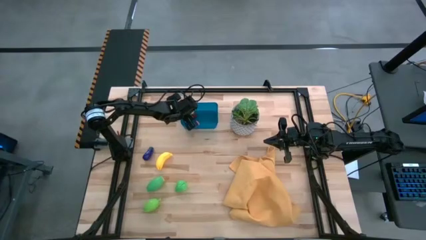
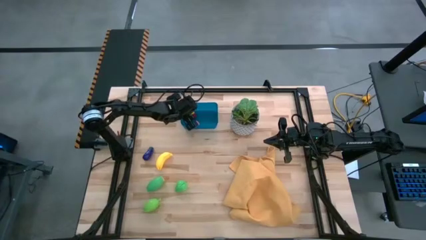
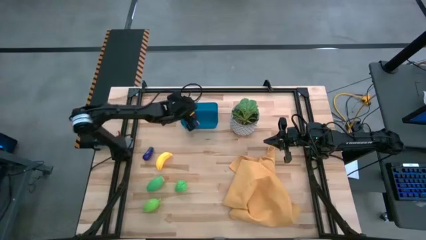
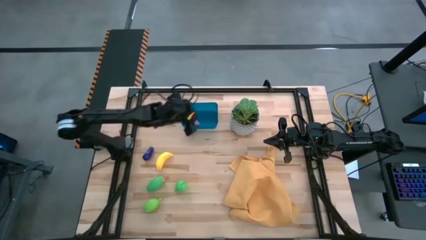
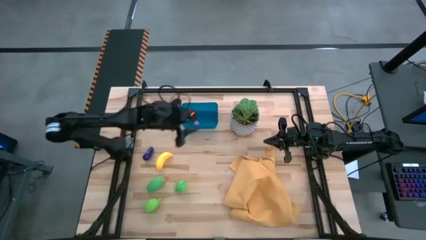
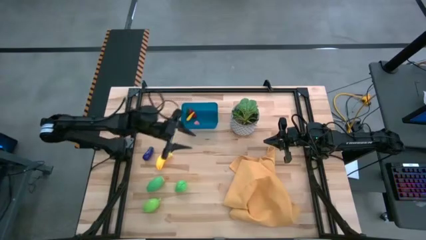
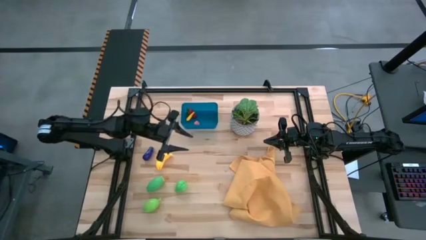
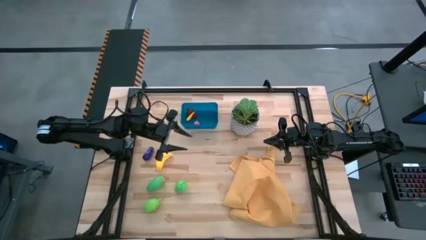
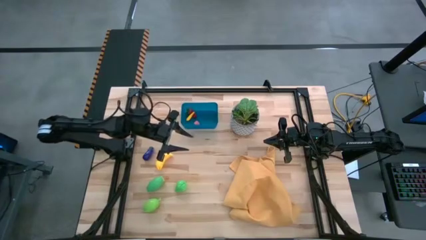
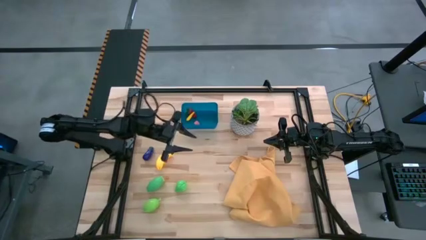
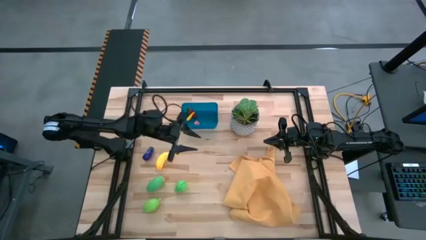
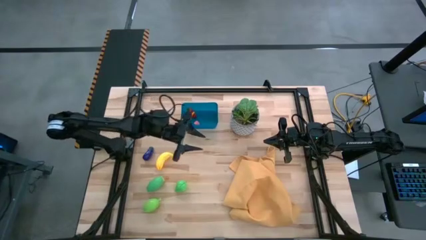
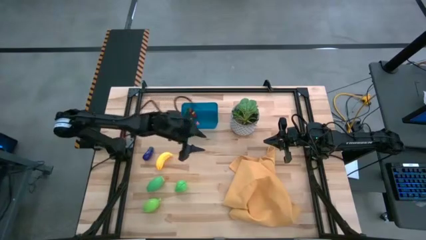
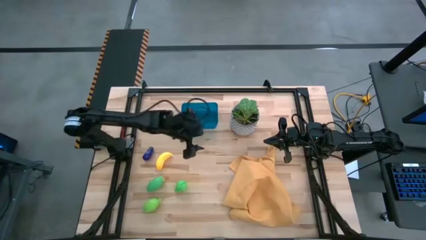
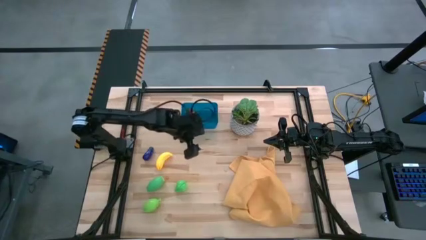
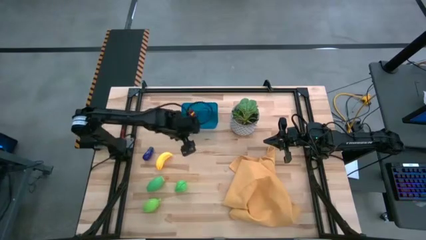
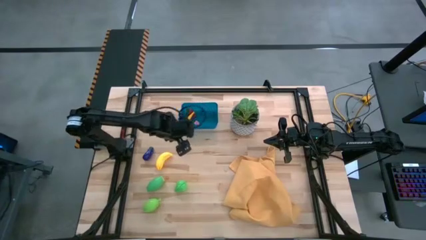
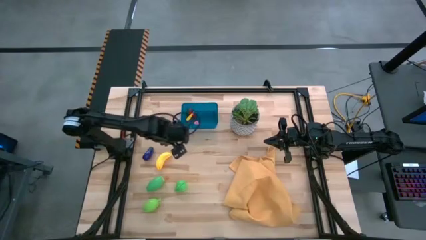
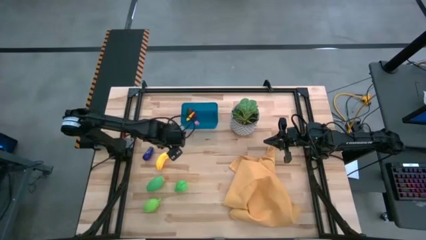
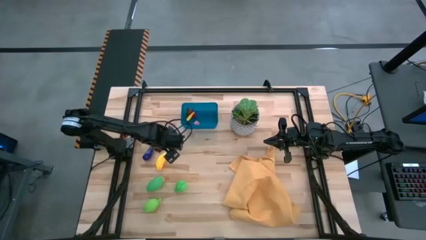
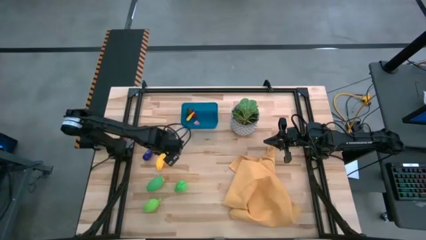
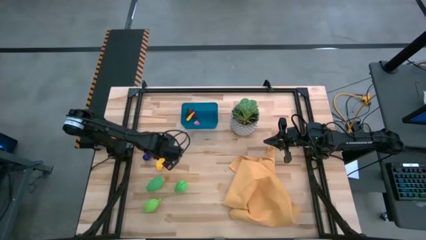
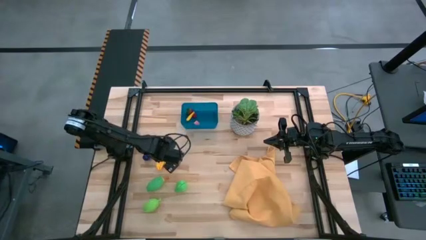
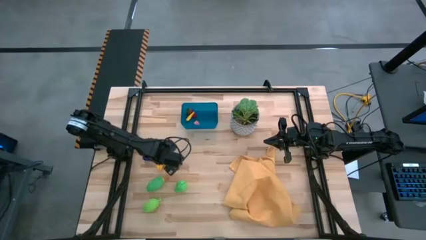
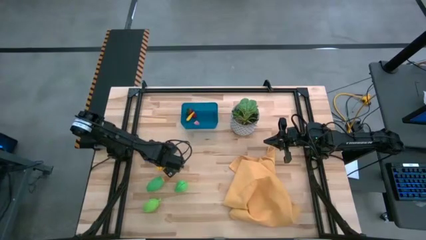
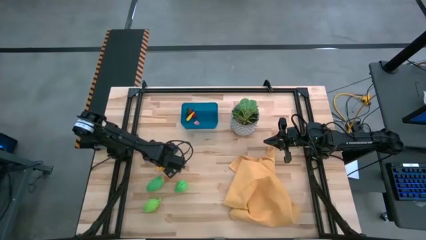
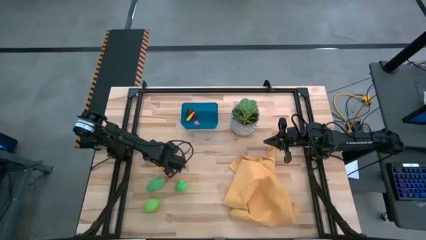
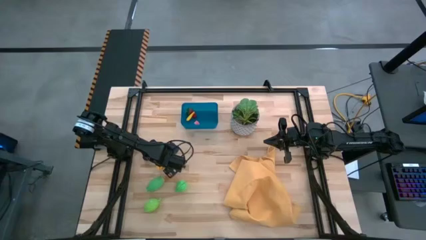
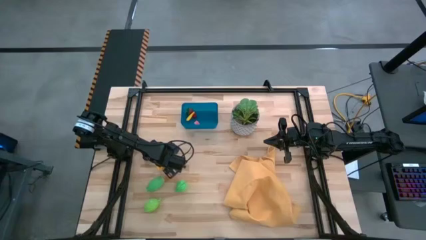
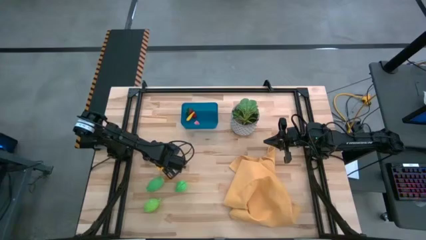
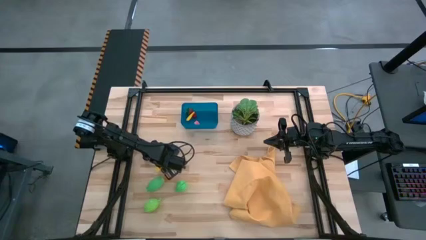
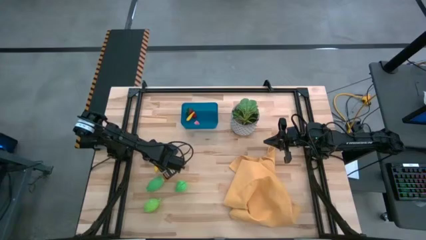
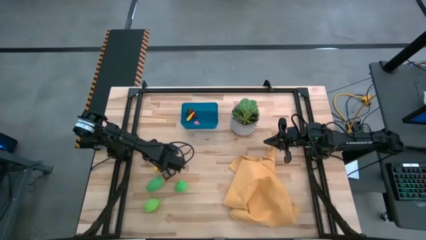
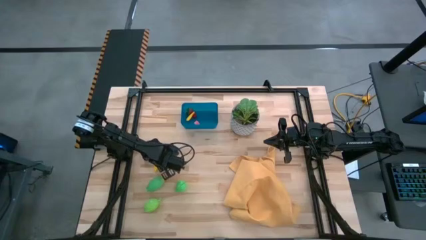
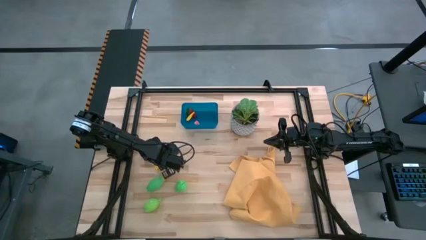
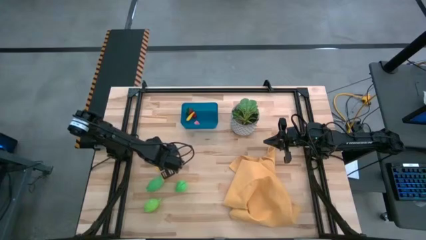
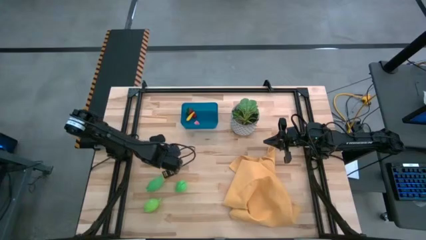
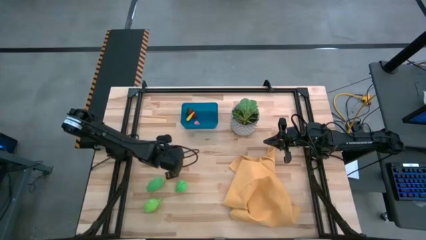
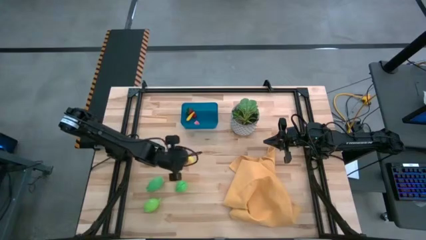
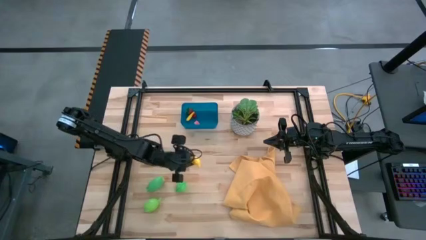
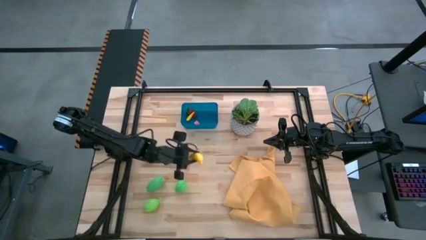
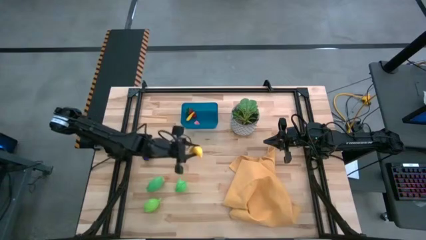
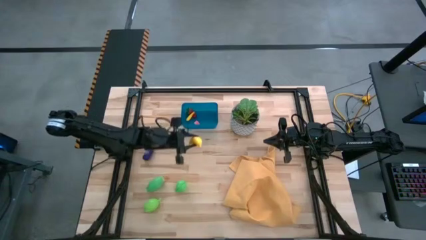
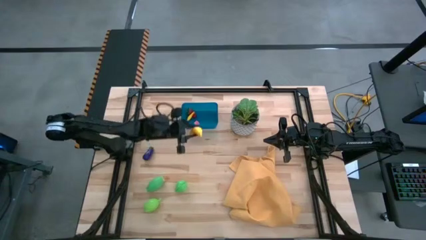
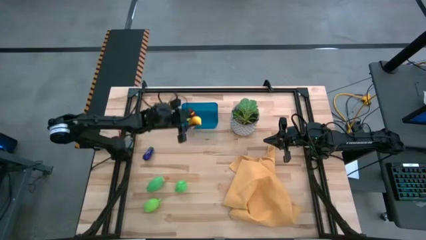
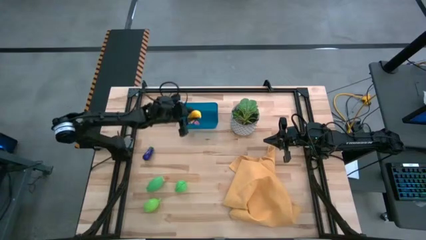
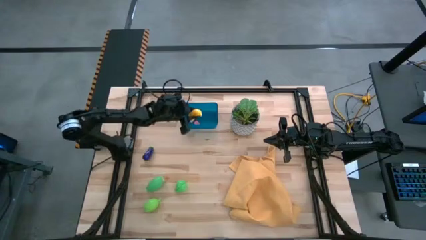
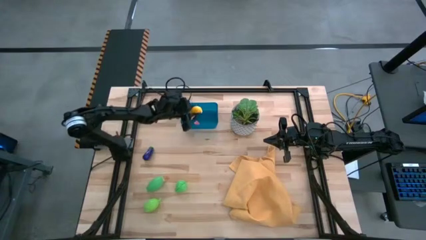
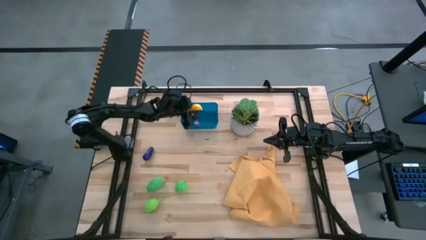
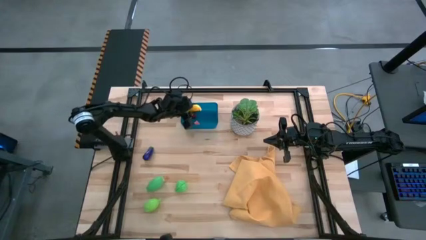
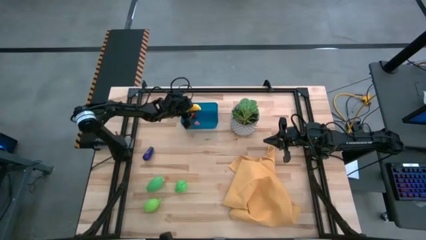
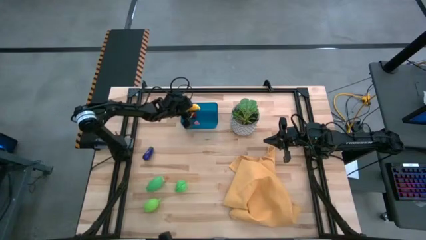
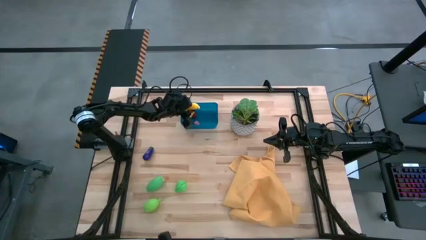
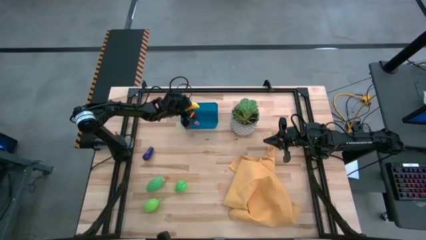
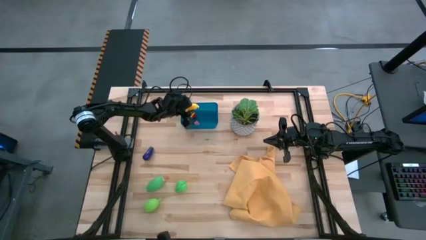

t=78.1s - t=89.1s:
Task: Pick and placing Produce into tupperware
Put the yellow banana into the blue bin

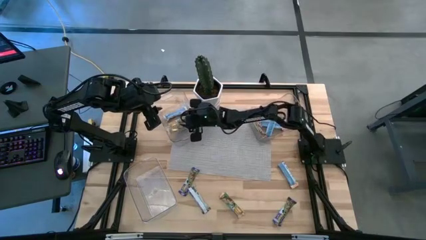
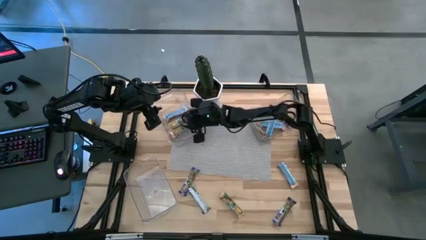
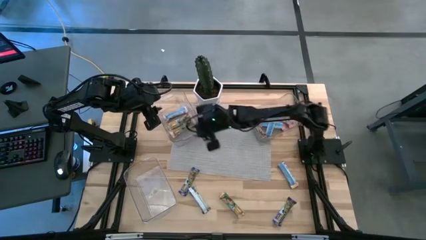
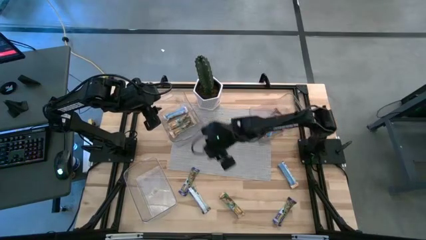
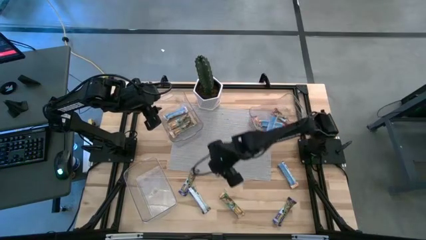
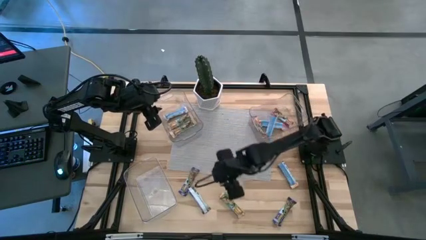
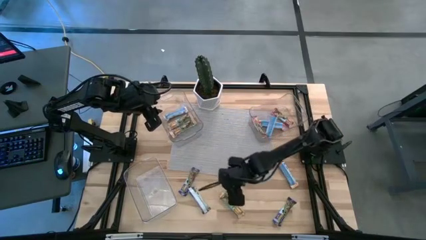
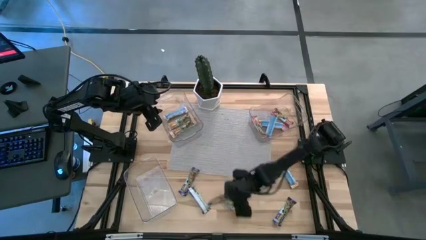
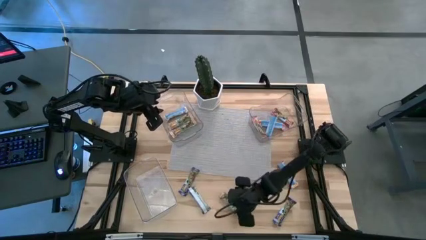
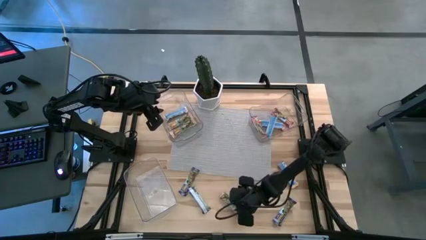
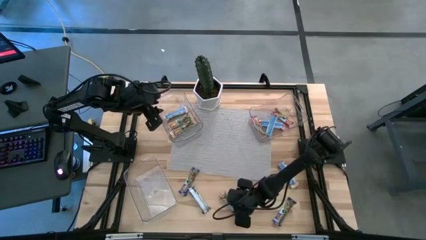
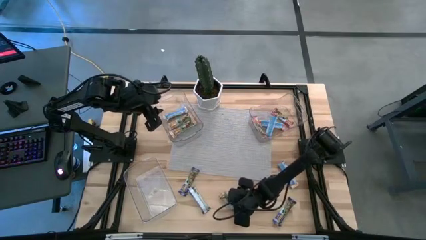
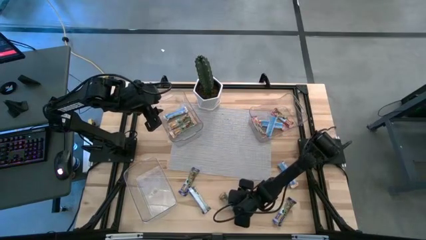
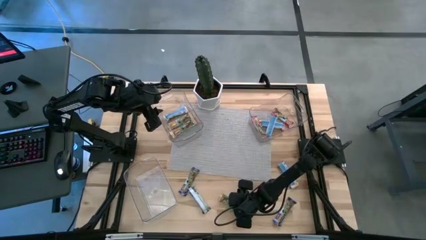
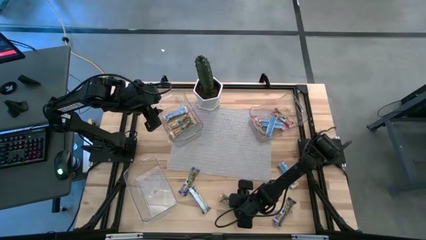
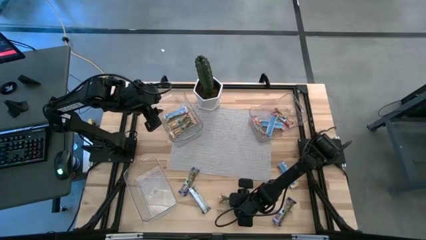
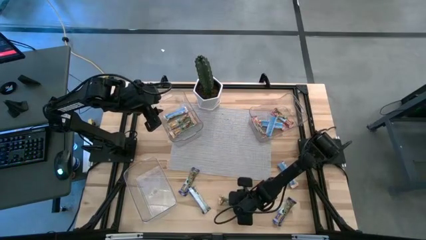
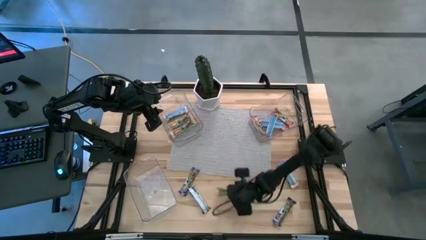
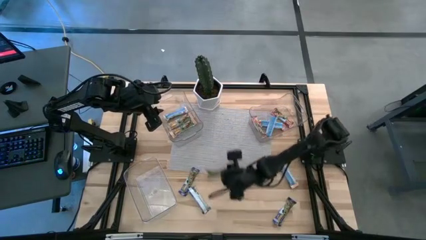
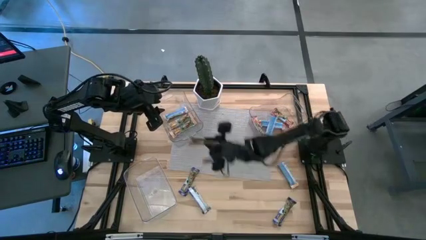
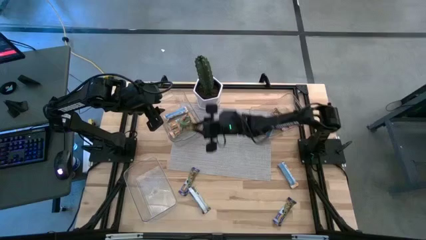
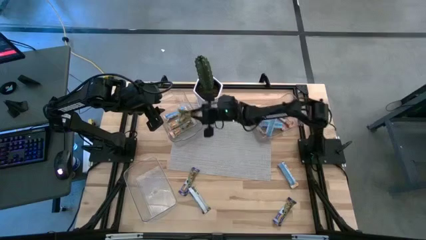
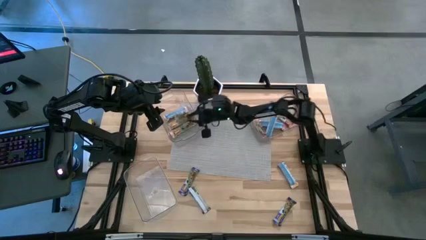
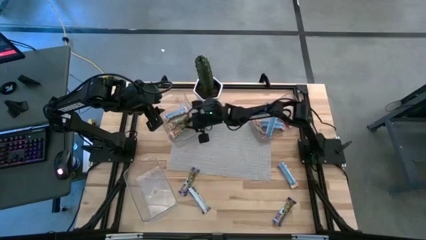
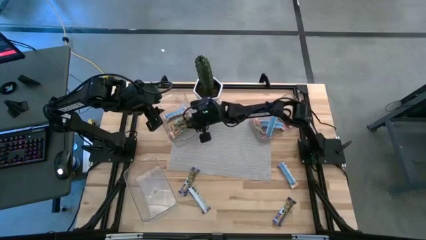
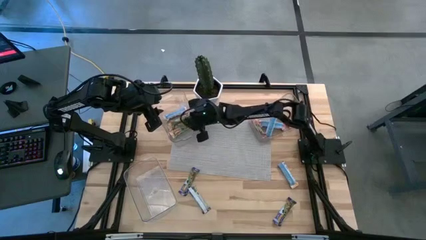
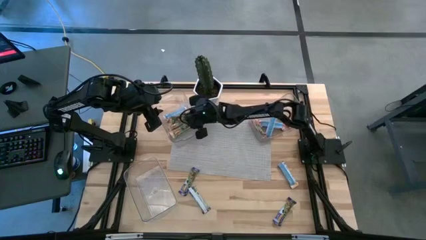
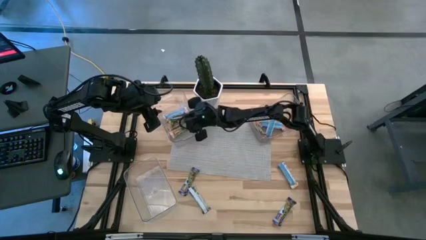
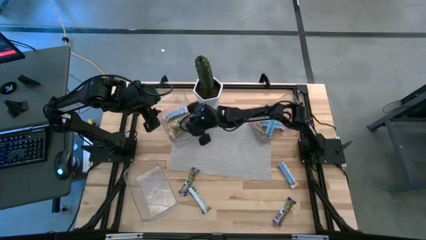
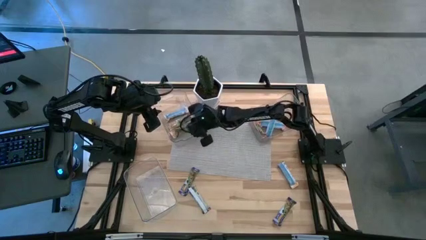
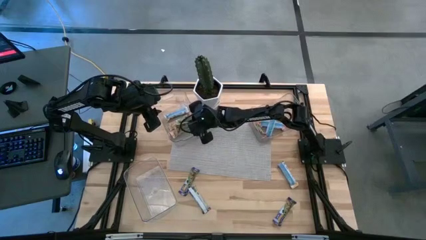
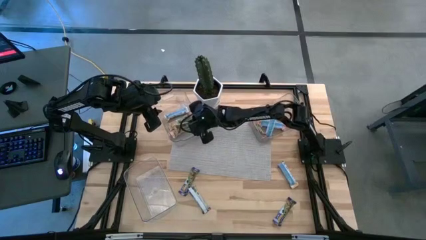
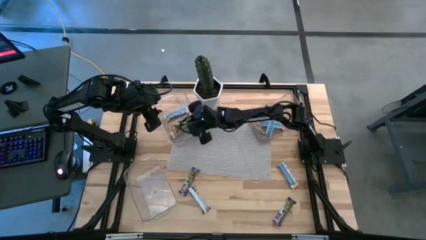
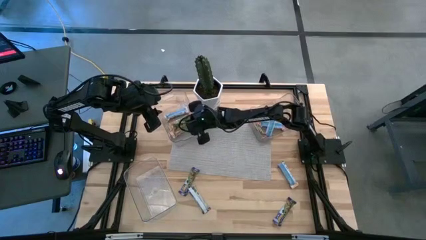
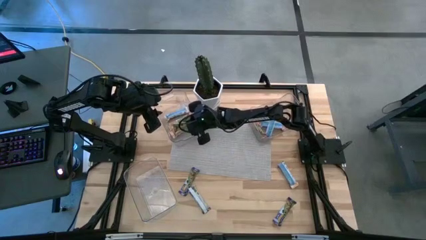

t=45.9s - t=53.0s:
Task: Pick and place Granola Bars by type
Put the yellow granola bar into the top left transparent bin
